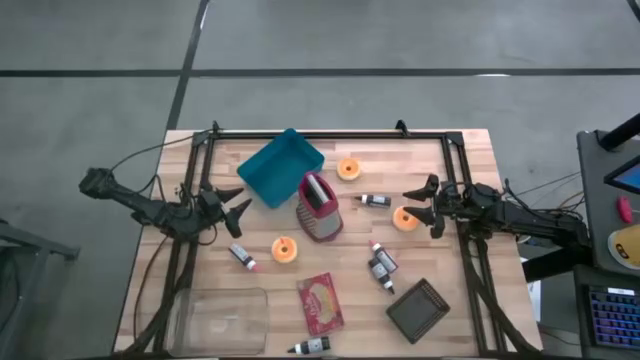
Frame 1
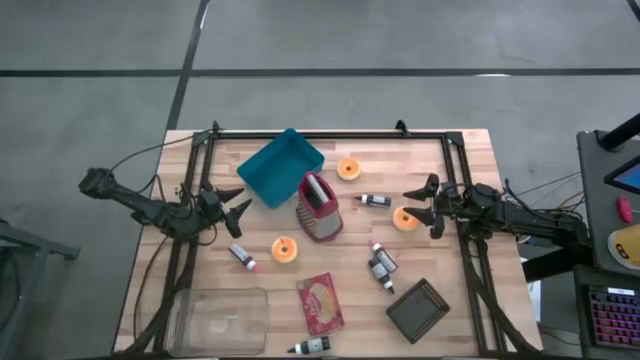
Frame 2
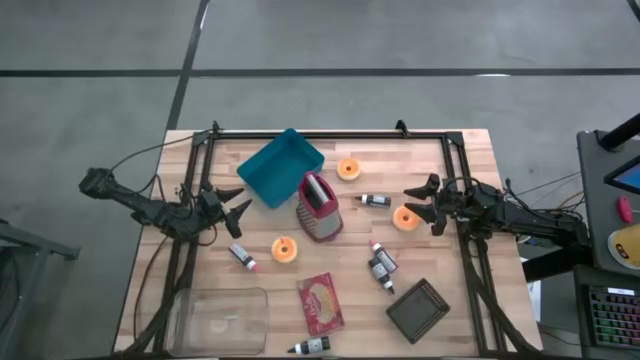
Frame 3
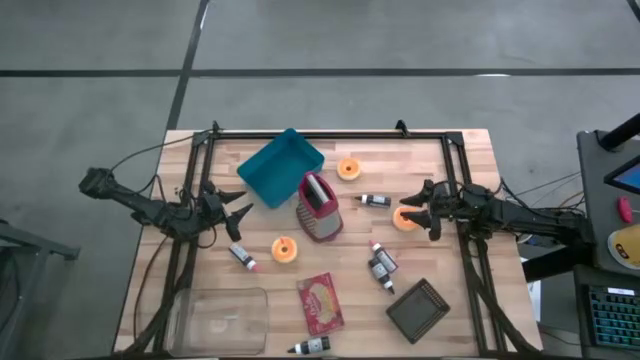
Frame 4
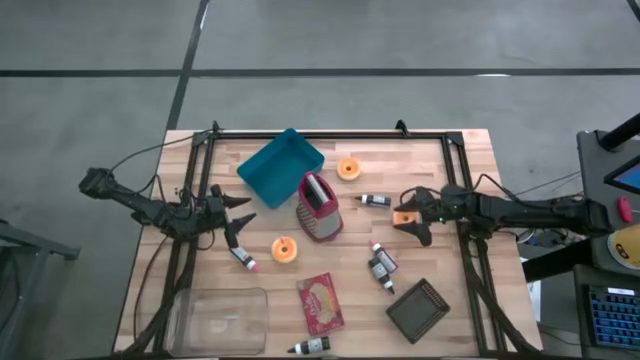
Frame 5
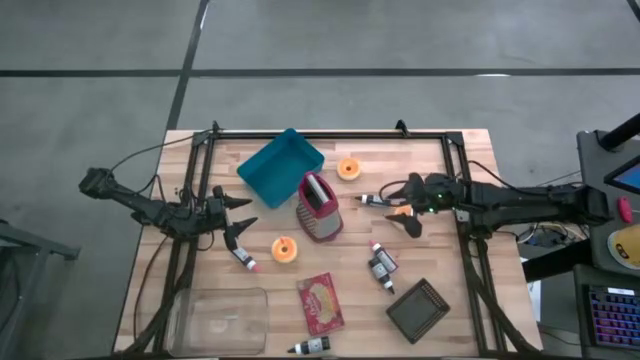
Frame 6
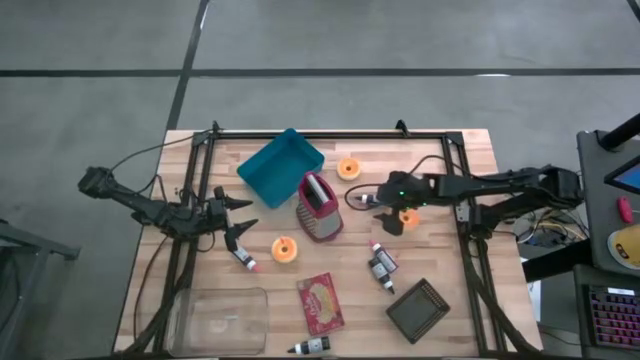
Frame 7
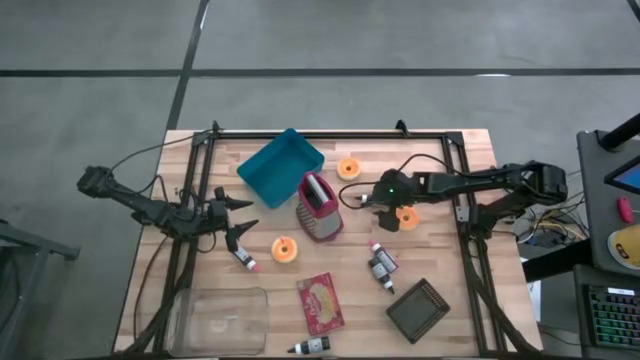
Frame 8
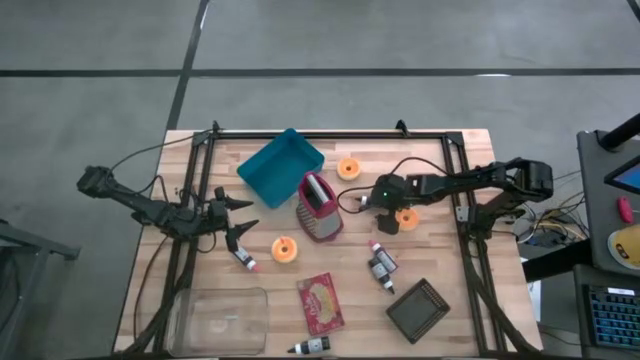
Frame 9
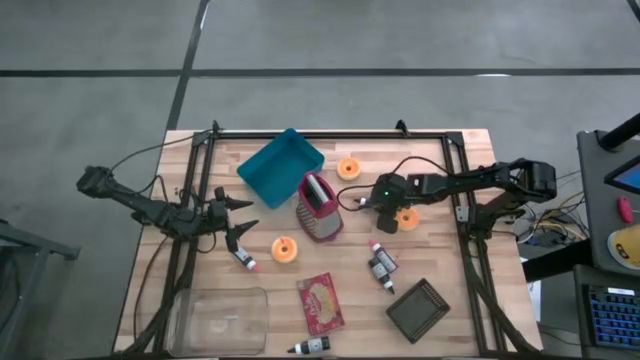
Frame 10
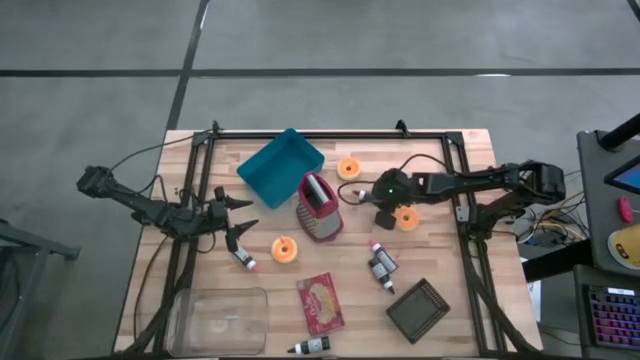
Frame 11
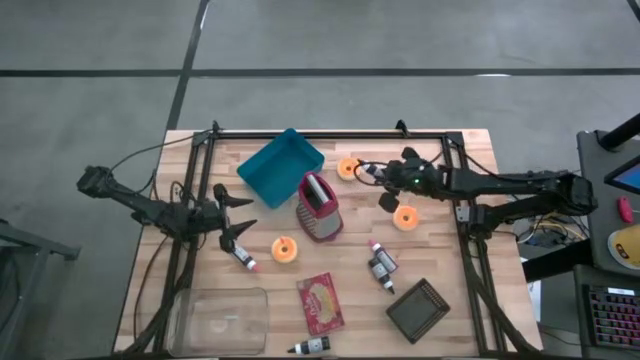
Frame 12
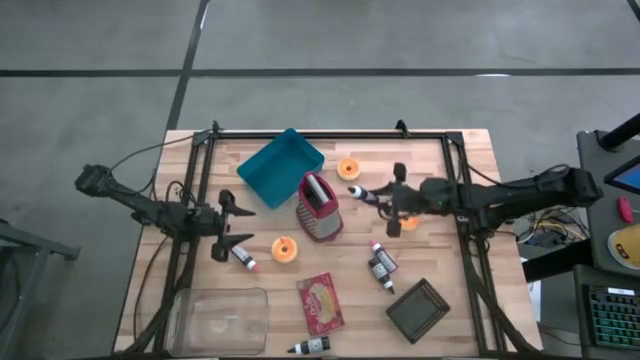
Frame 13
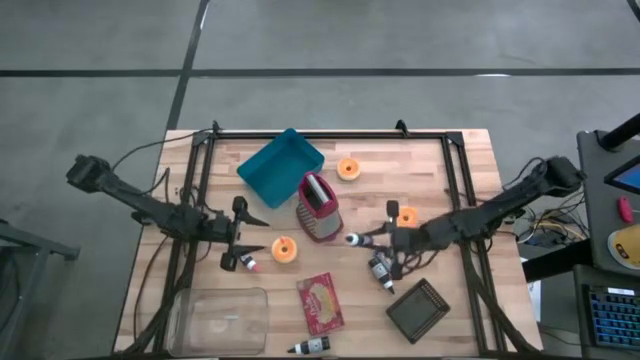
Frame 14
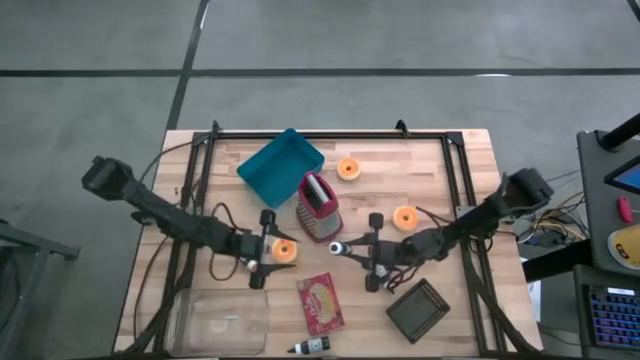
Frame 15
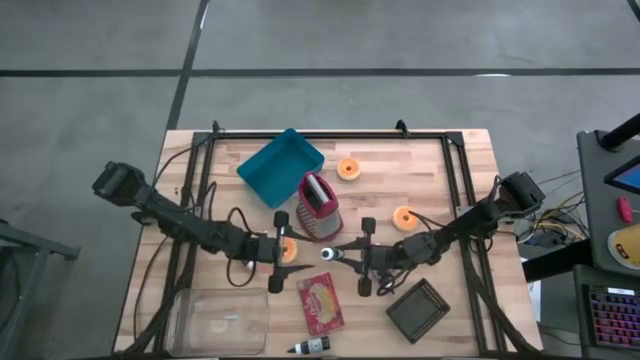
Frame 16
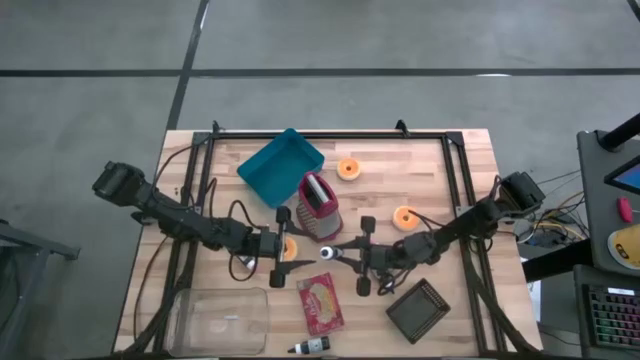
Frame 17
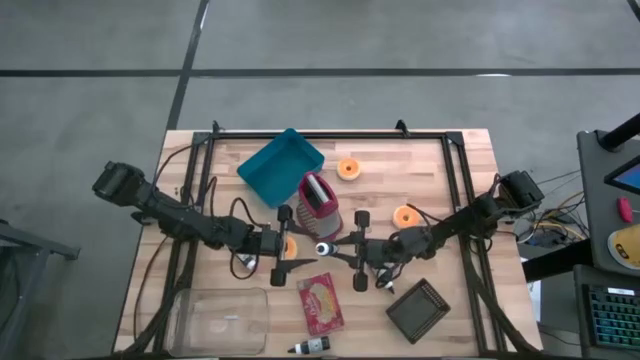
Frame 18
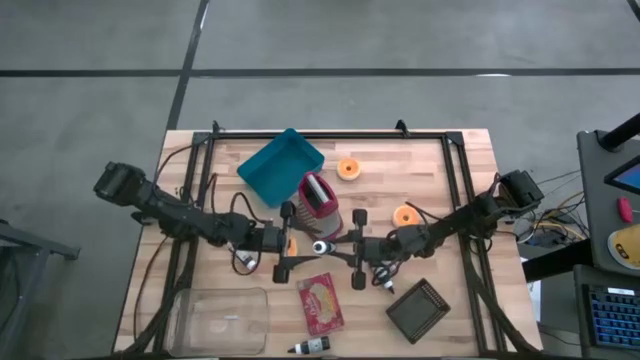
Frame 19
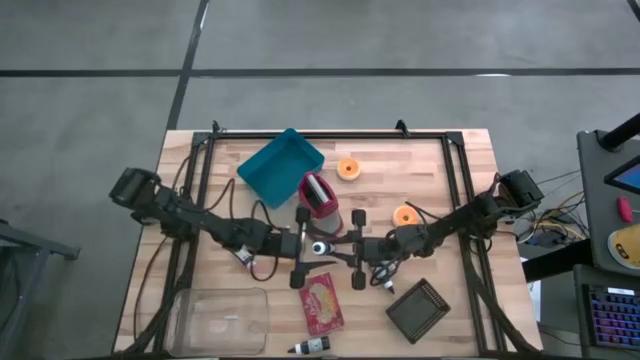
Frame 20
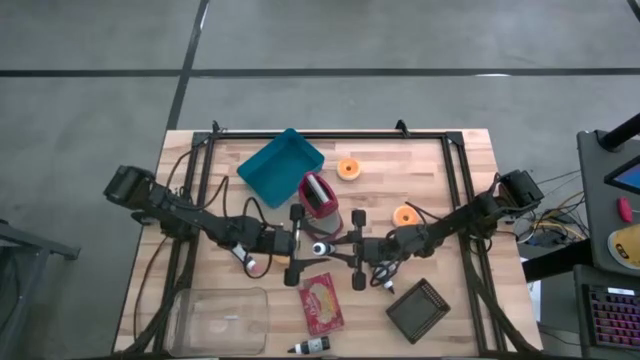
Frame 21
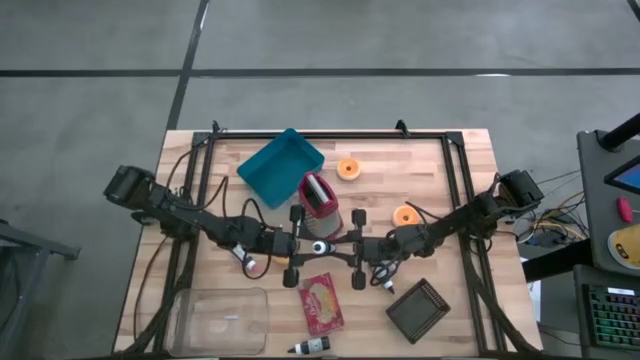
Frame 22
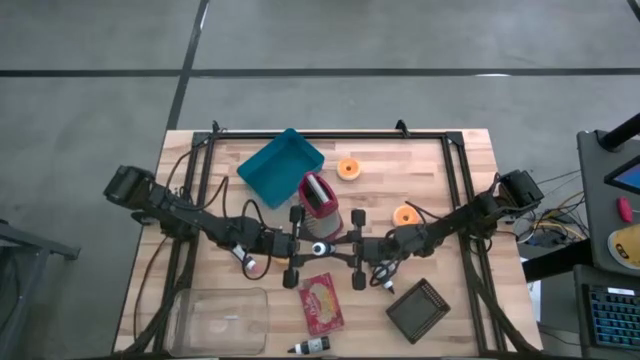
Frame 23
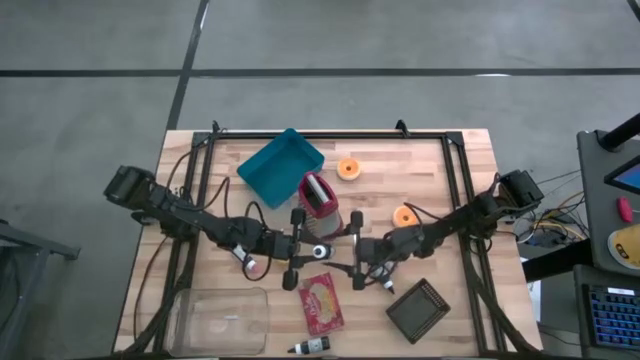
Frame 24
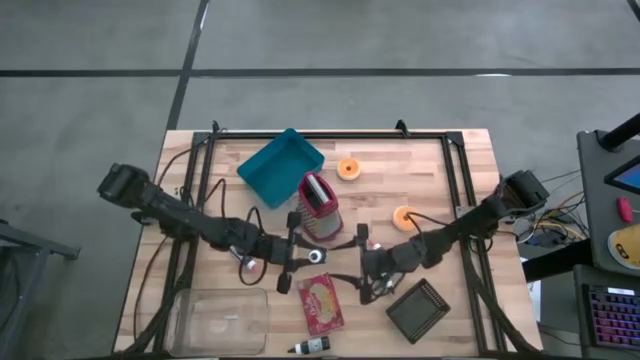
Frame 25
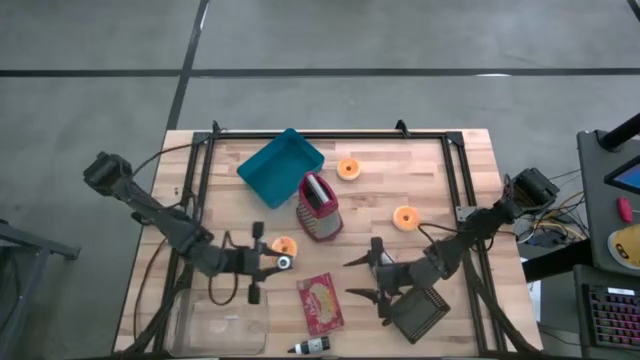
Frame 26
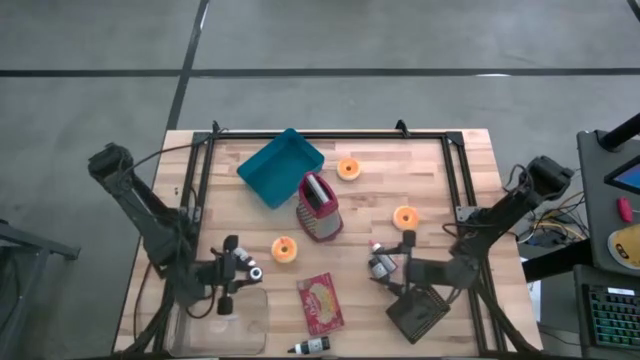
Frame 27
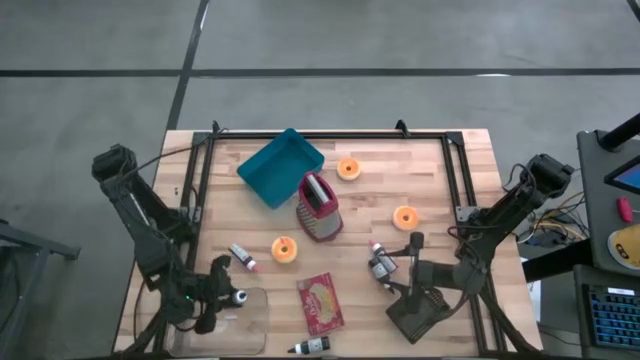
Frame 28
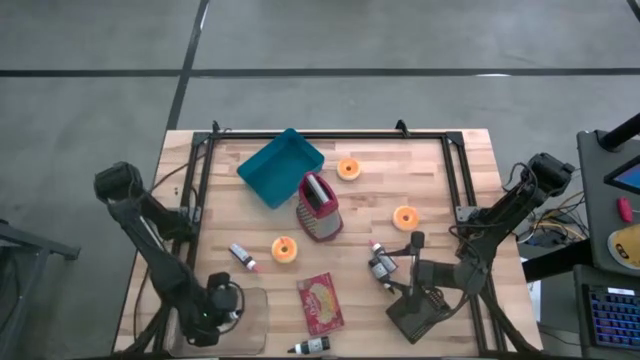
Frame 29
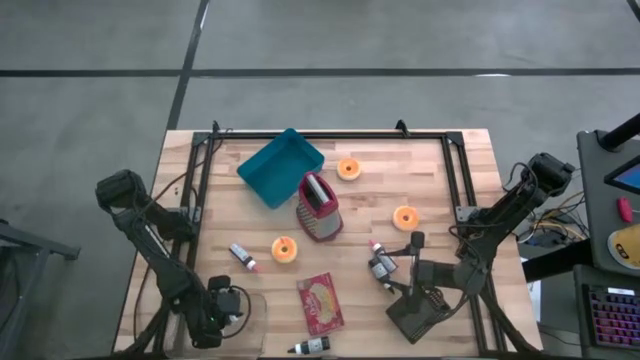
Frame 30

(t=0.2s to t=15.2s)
Put the top black food coloring into the transparent bin

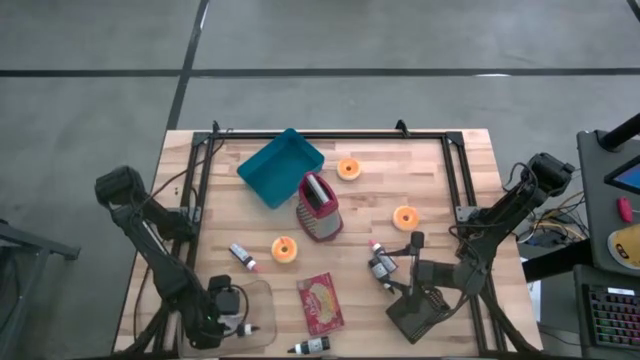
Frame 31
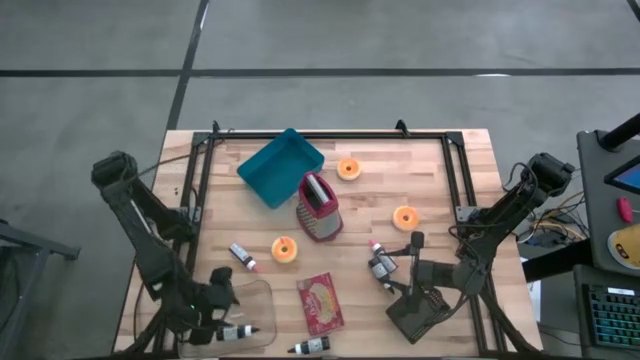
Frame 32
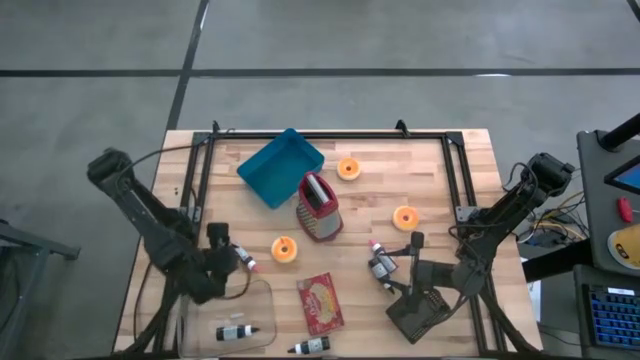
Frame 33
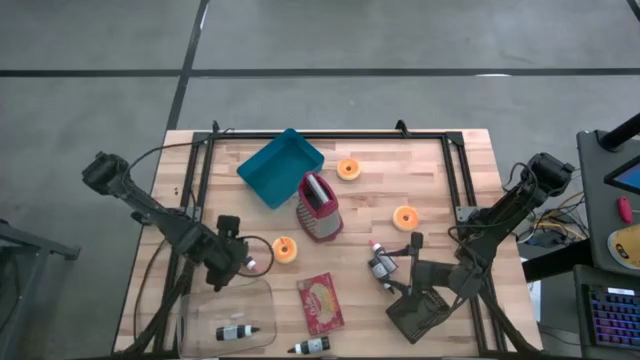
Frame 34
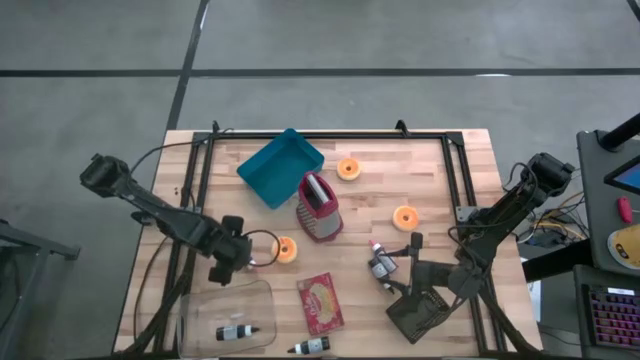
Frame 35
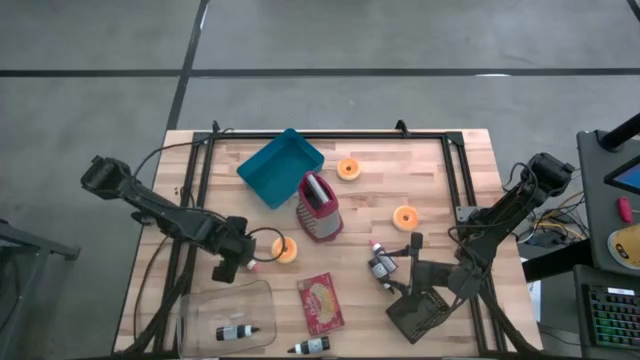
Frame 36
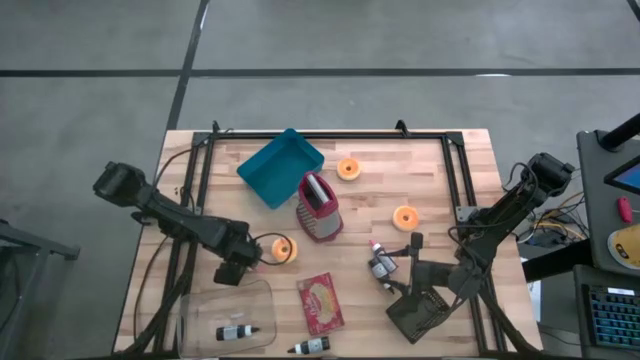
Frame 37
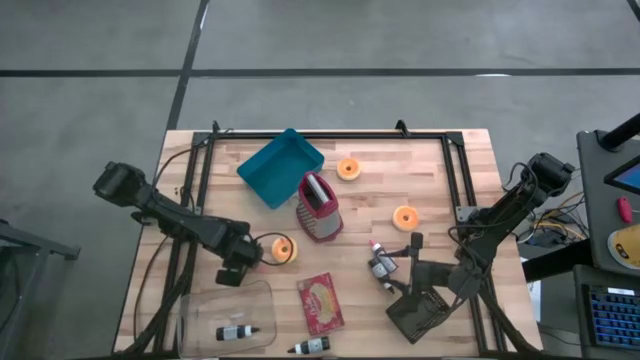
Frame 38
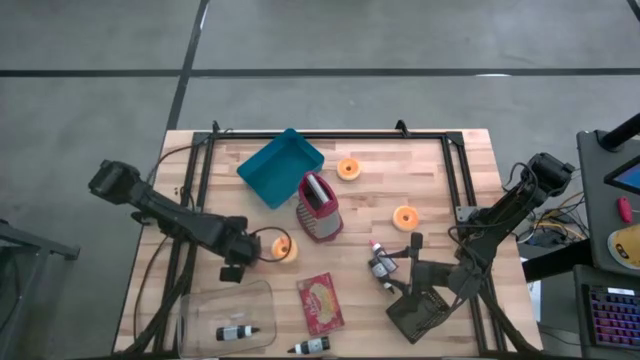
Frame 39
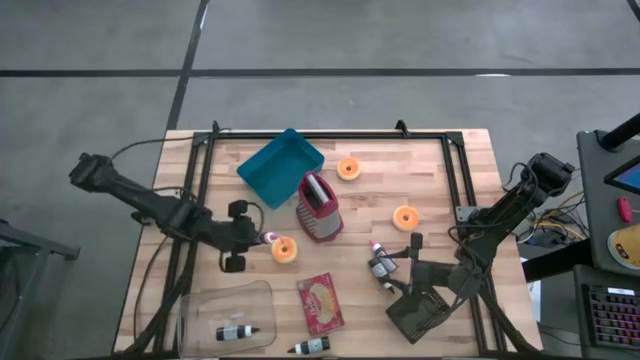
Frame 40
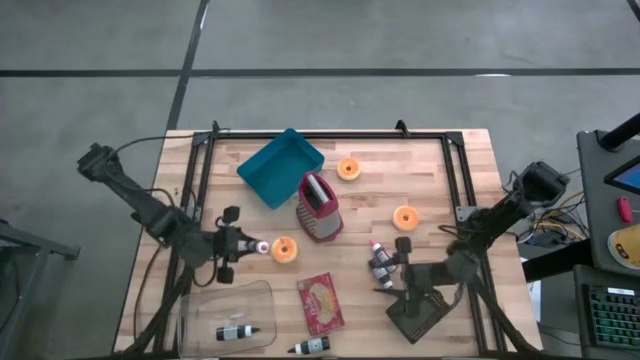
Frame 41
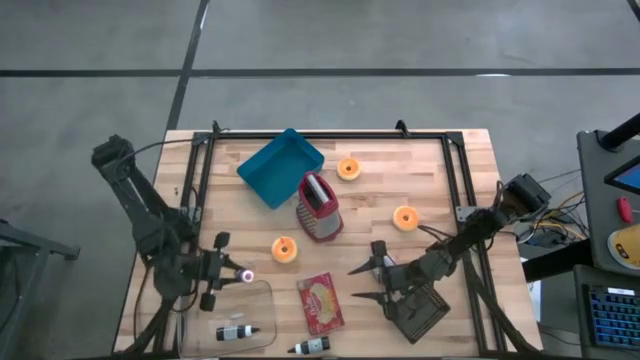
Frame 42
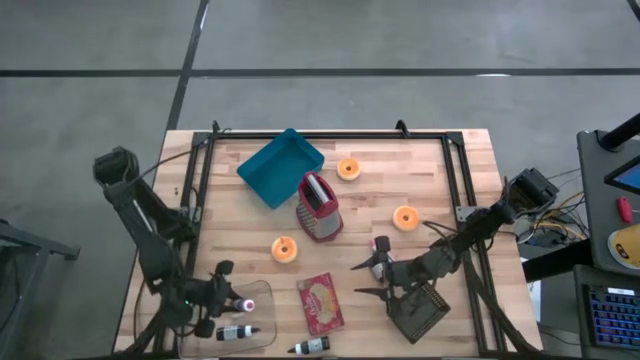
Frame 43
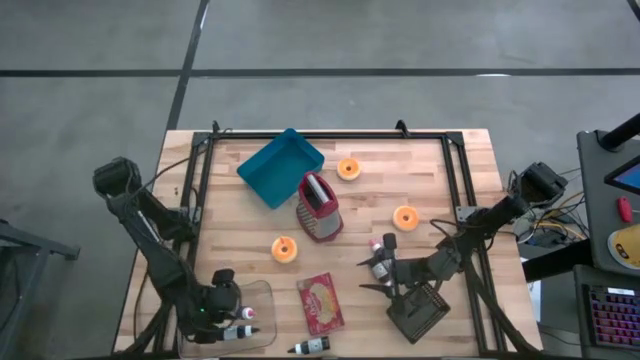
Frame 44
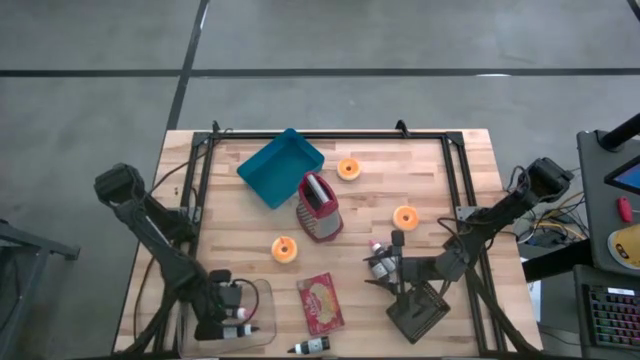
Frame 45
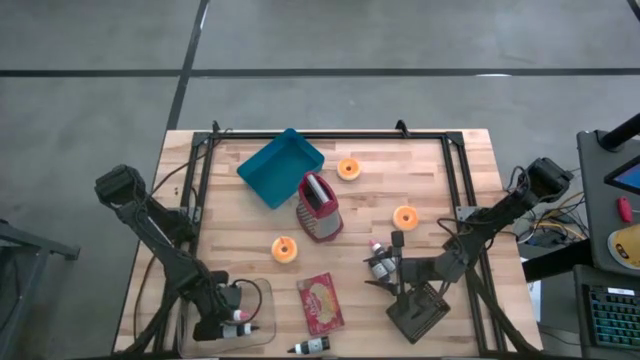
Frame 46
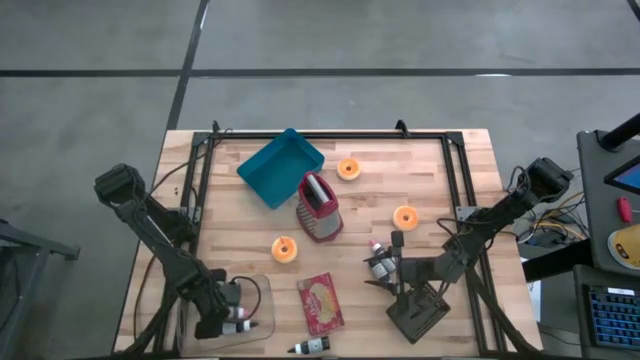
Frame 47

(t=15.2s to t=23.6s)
Put the left pink food coloring into the transparent bin
